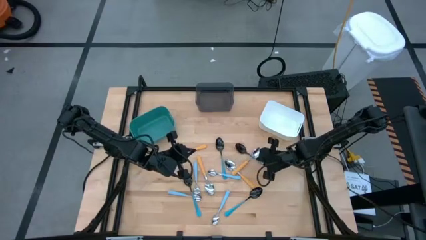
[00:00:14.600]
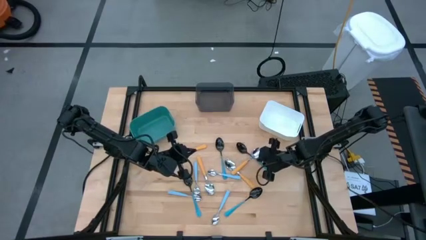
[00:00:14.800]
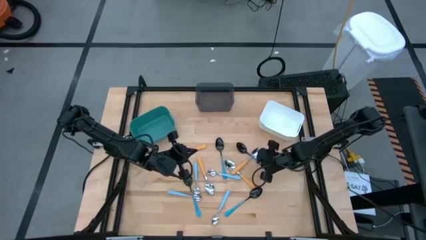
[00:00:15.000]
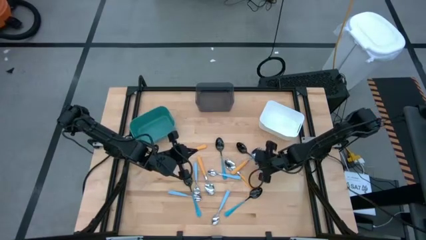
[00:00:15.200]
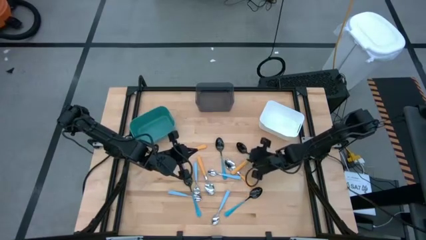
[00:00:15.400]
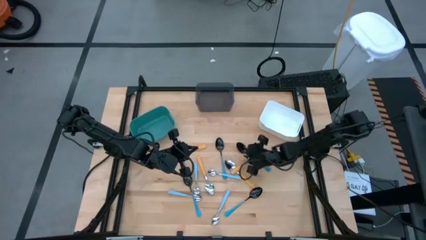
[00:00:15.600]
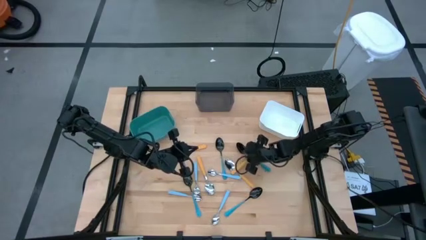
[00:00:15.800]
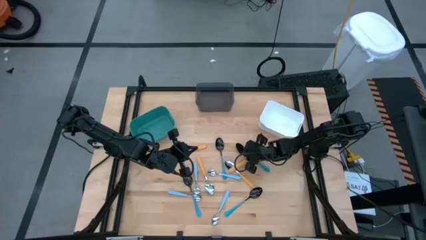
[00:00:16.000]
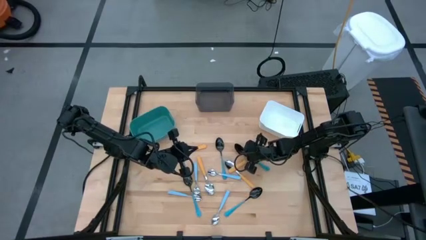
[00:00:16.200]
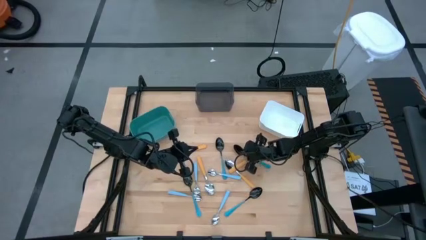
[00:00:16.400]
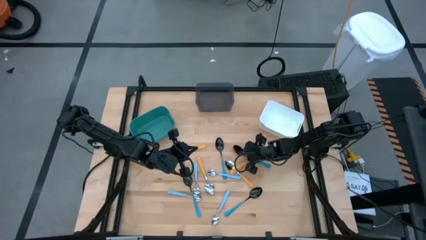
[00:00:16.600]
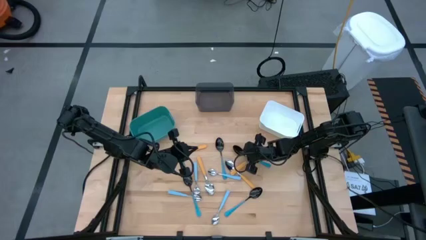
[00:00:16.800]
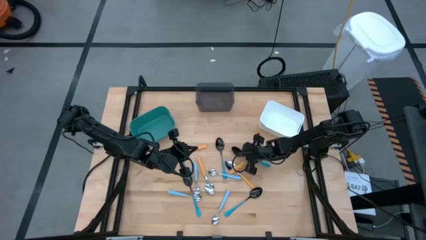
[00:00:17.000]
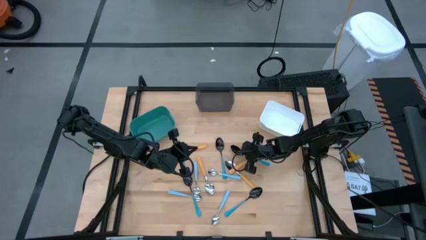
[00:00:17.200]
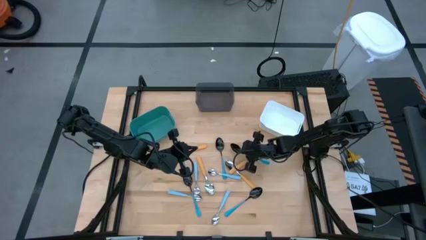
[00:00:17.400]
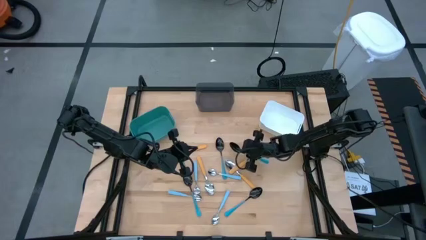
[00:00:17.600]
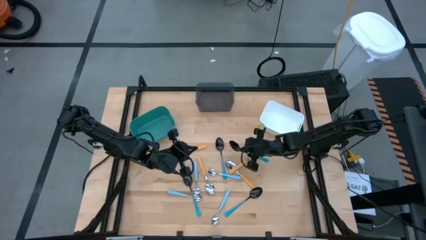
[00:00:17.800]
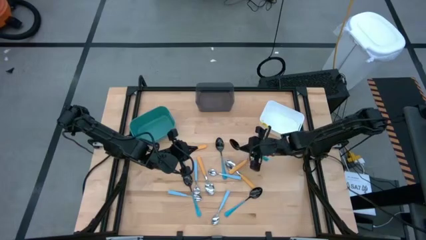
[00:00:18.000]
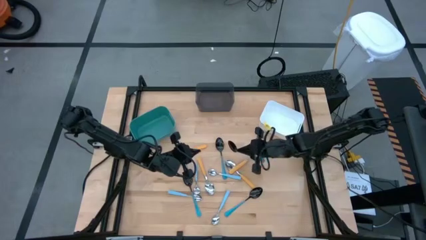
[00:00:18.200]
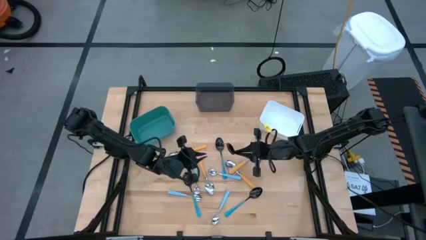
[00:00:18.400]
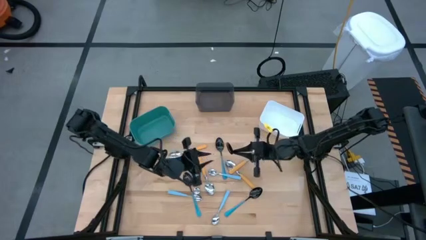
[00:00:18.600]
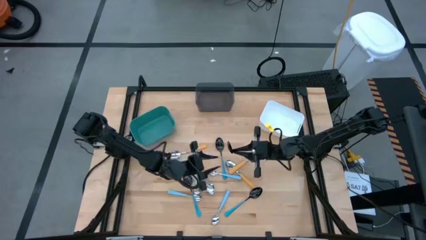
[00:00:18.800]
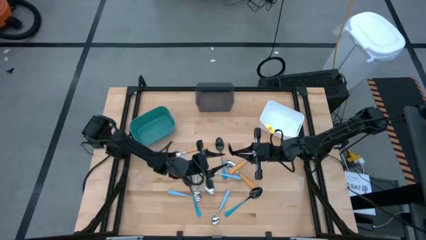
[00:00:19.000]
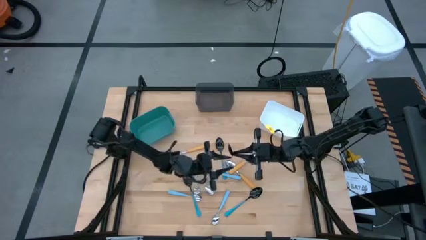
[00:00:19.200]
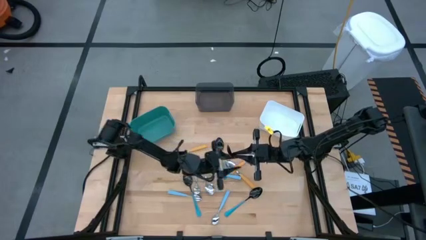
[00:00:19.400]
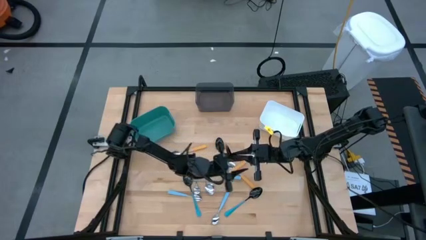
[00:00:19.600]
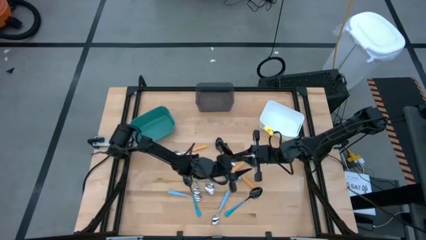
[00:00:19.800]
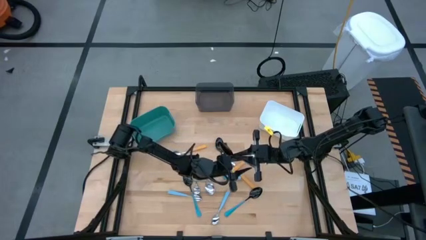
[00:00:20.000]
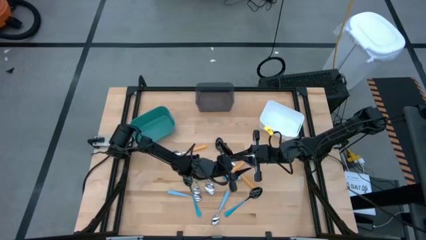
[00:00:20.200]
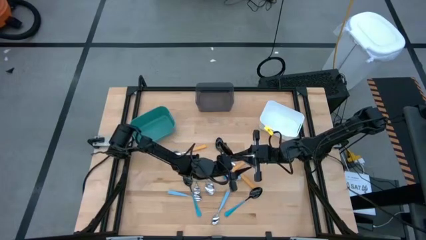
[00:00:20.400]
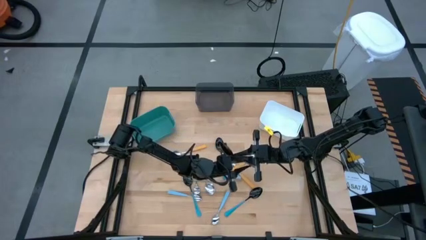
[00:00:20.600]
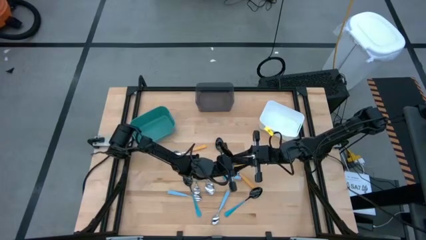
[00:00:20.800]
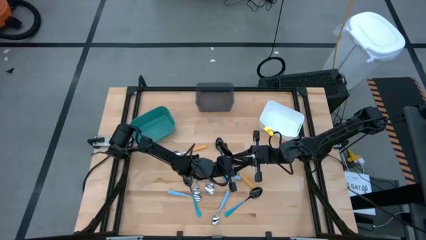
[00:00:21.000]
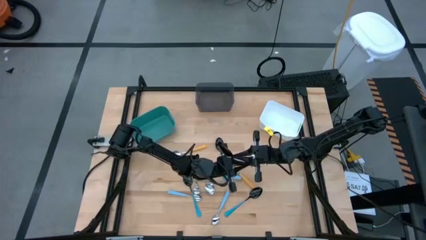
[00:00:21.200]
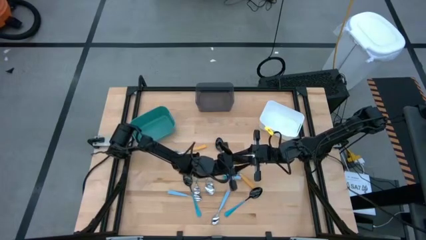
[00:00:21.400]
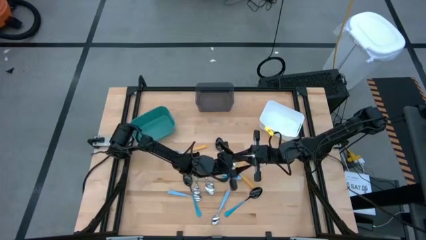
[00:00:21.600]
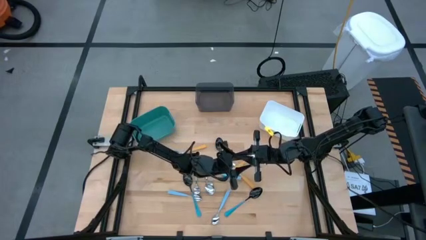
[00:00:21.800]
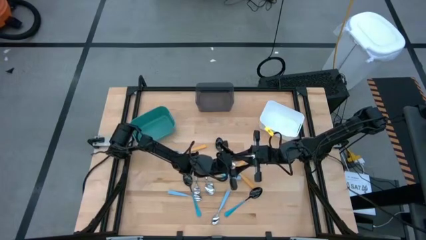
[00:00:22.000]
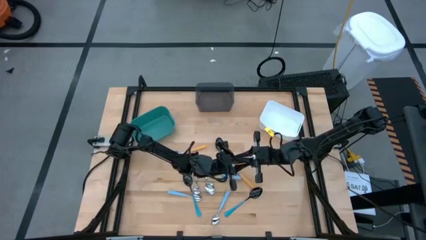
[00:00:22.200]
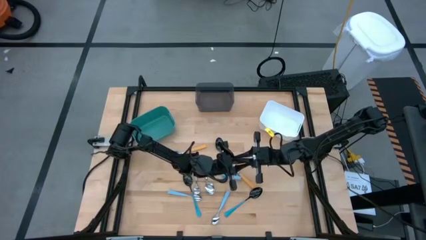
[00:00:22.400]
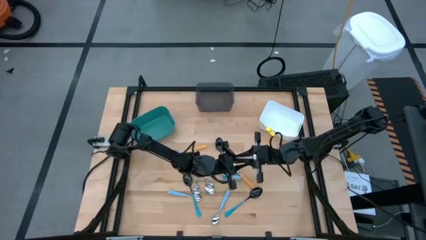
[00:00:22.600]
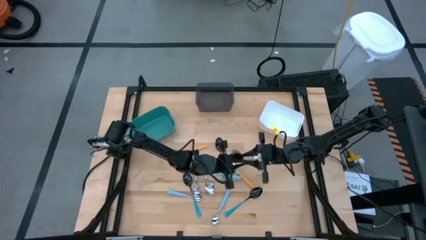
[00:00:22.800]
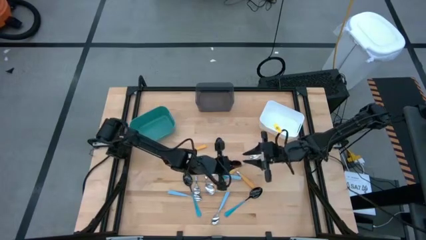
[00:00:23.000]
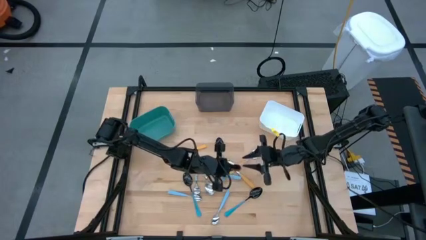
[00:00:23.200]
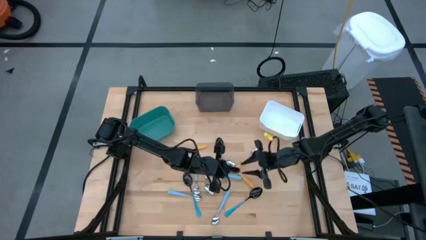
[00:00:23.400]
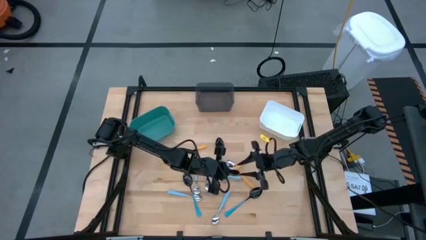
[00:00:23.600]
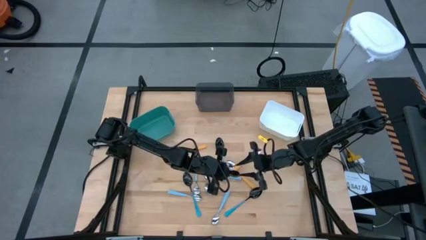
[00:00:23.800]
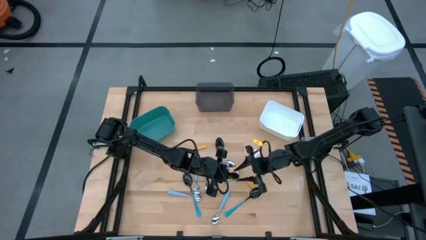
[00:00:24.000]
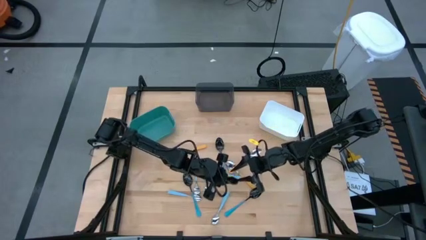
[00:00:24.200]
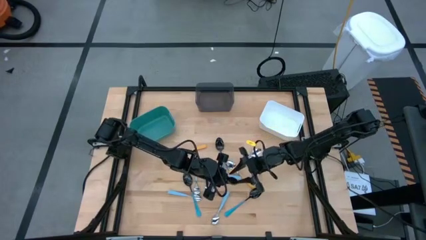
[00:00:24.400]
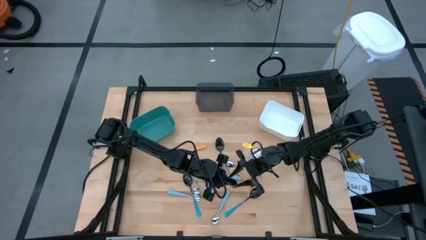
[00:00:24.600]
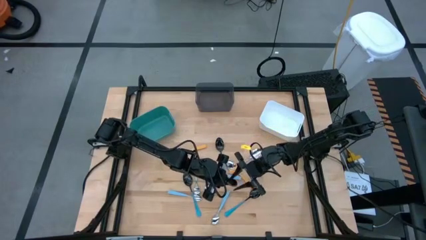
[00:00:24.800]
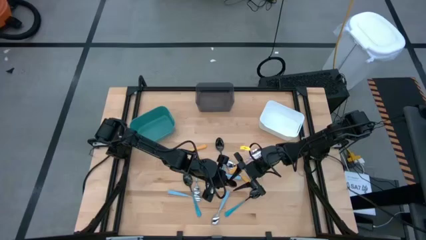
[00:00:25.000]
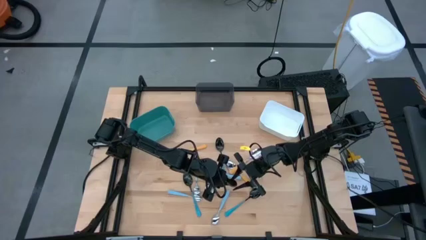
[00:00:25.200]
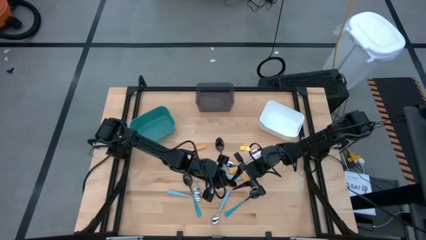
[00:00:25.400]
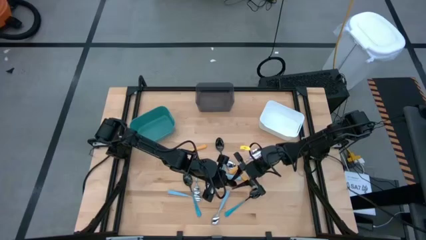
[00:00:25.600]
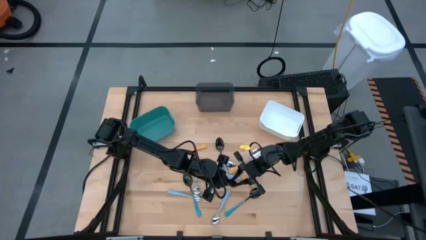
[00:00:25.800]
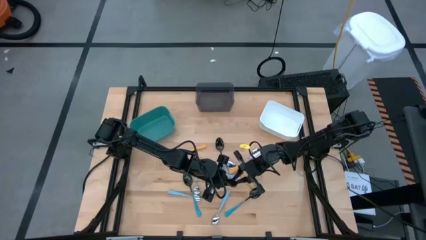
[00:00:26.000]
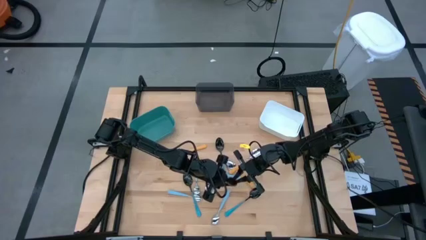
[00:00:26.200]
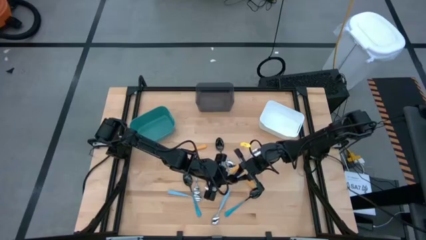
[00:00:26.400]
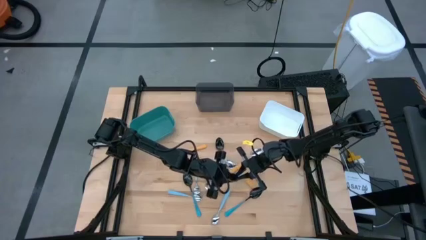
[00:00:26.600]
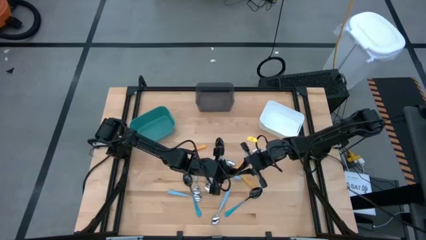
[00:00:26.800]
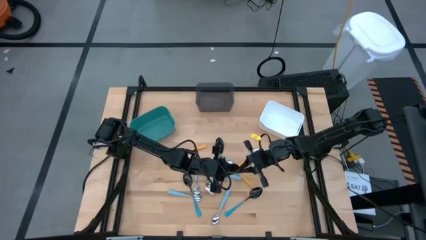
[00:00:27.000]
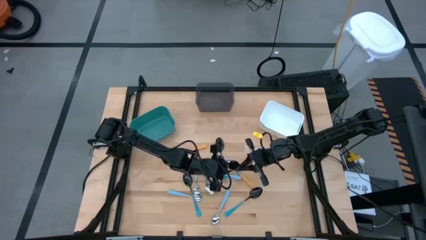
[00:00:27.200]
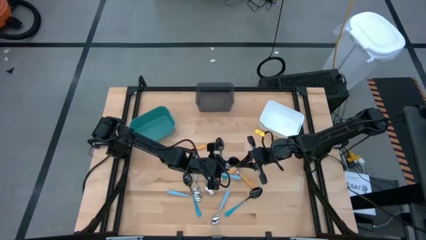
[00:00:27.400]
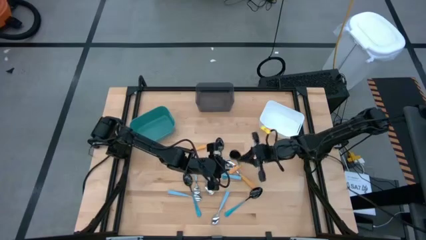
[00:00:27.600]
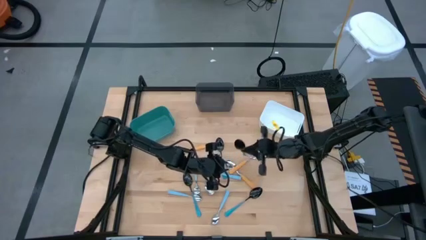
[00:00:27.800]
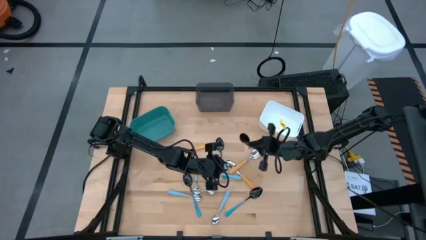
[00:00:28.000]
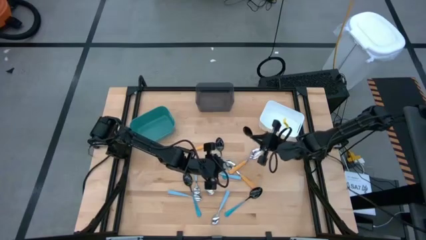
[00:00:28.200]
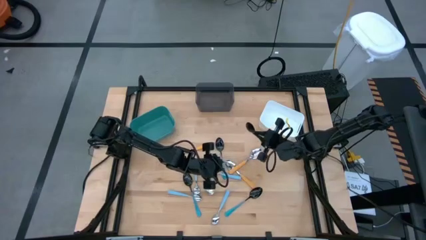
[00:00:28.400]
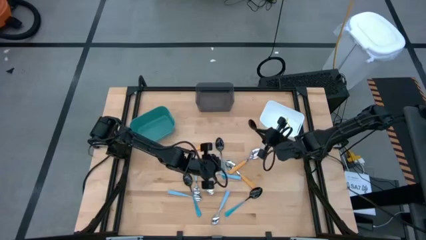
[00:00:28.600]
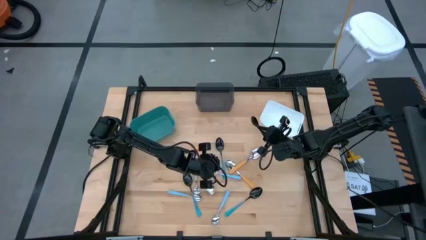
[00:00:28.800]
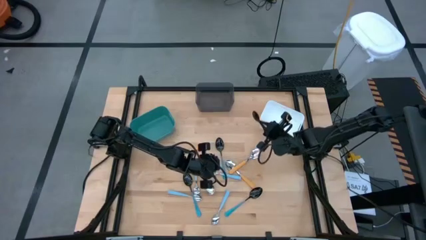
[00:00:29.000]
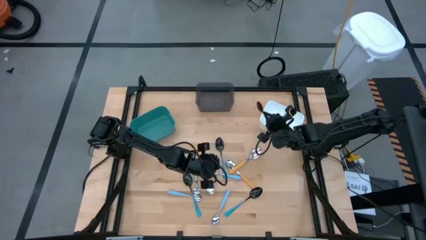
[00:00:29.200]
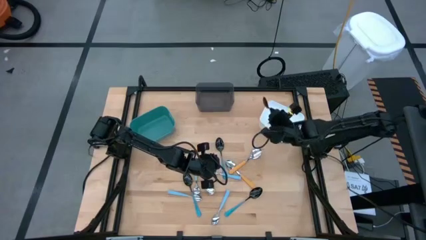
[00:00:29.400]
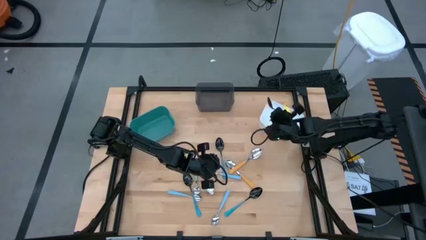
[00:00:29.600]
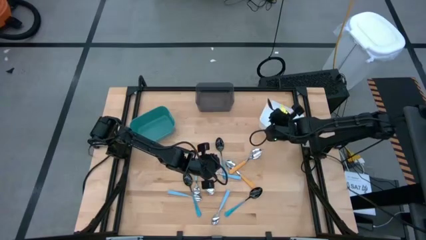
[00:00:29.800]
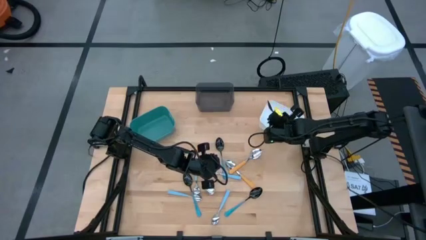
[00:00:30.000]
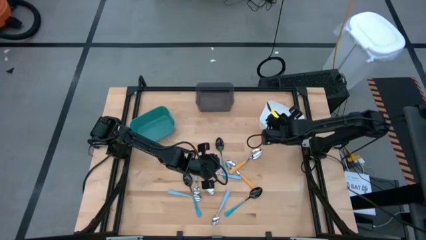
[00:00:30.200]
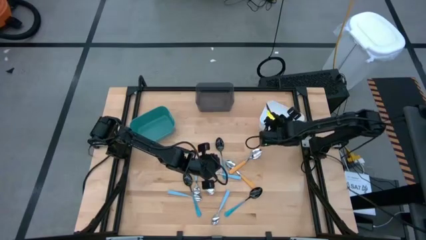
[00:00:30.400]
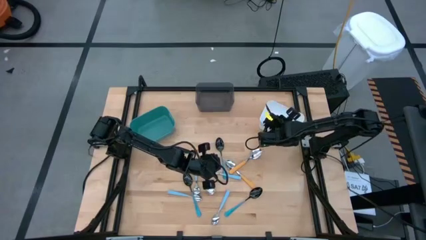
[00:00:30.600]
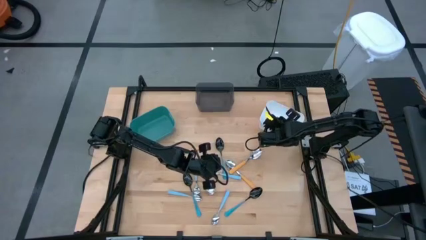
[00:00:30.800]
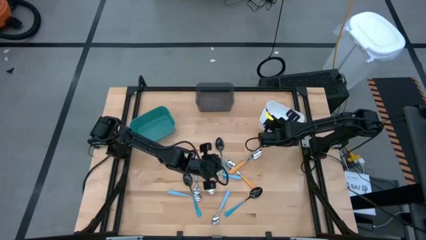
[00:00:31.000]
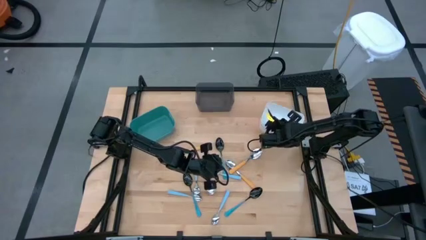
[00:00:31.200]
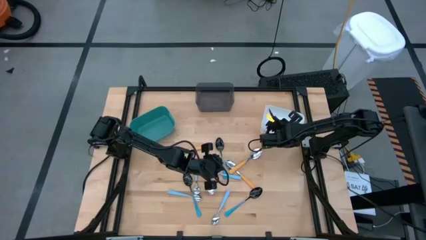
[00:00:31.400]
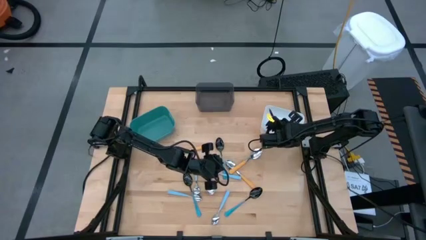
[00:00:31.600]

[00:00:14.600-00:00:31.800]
Task: Sort silverware by color (type)
Put the blue spoon into the white bin
